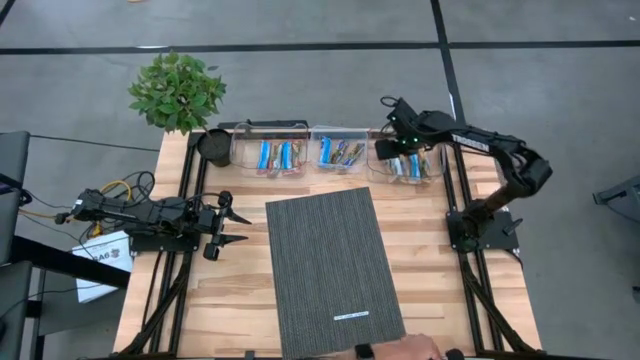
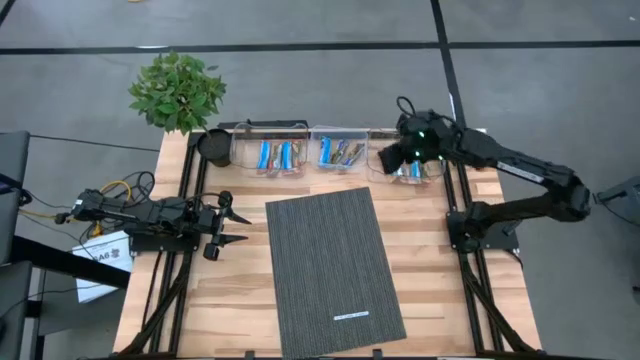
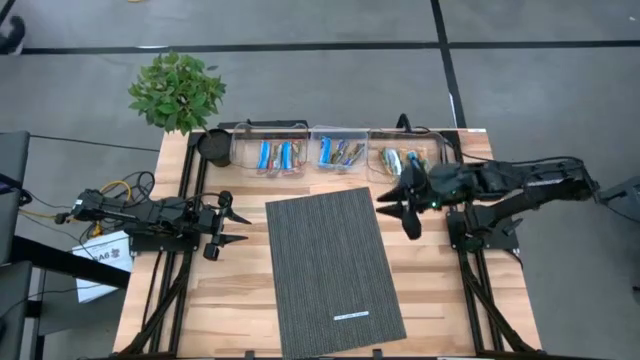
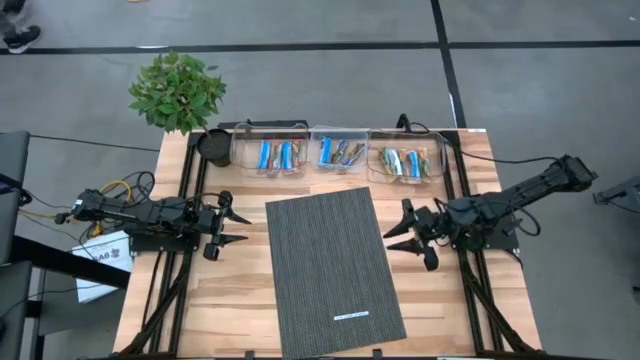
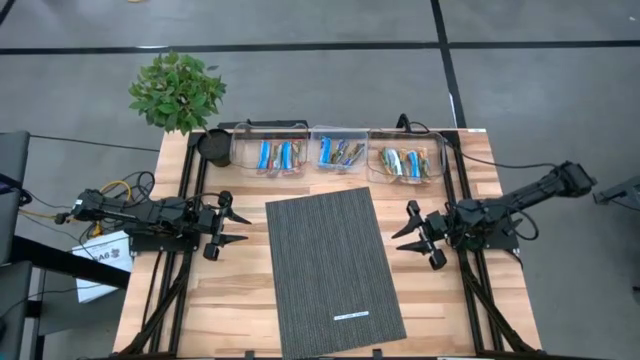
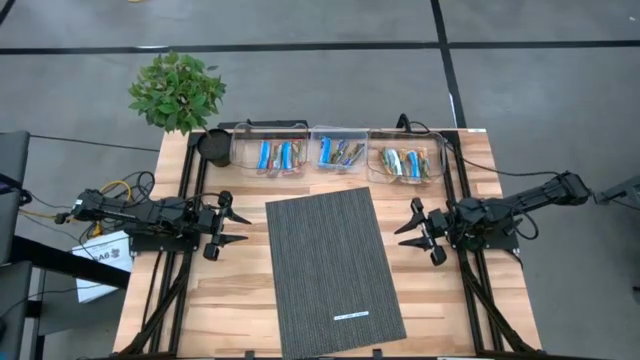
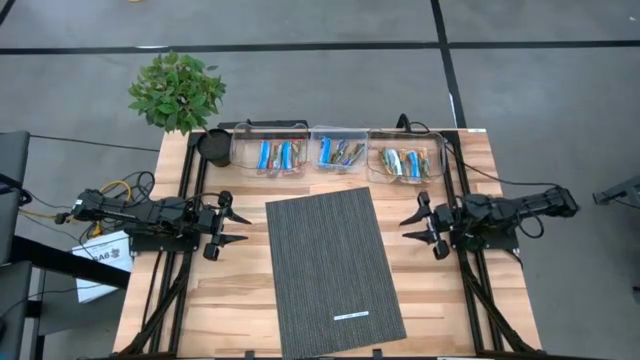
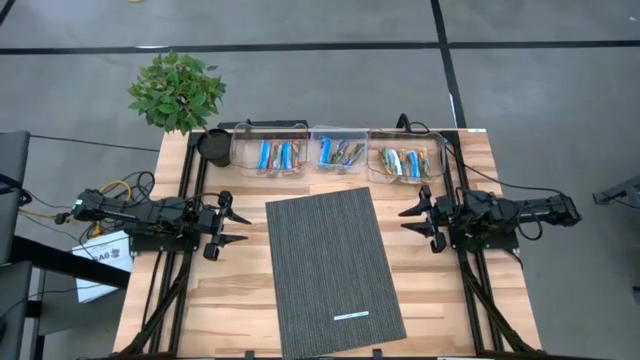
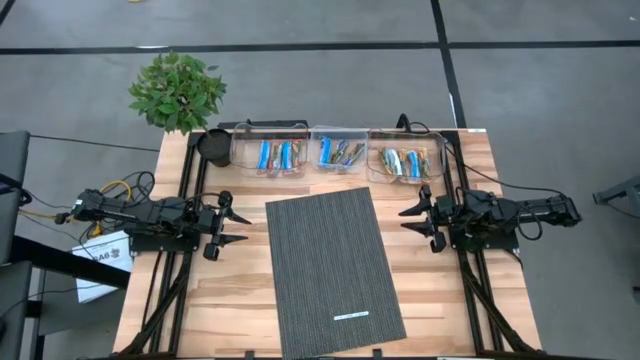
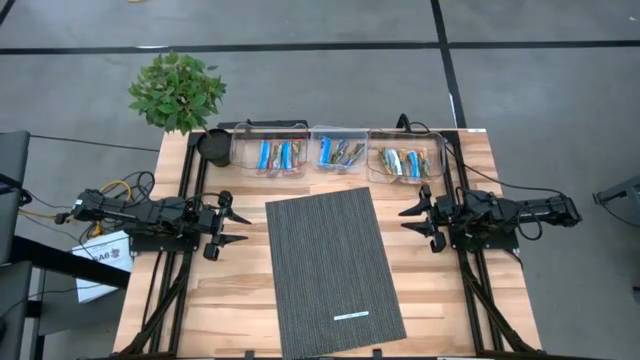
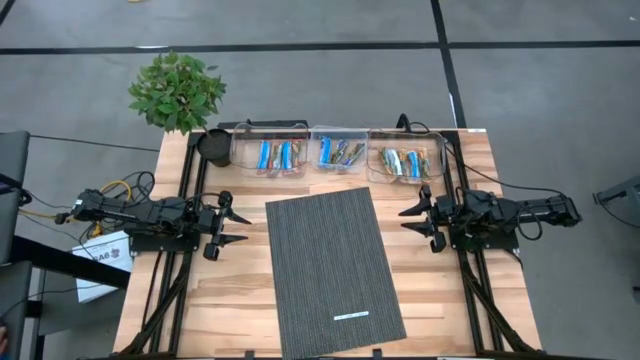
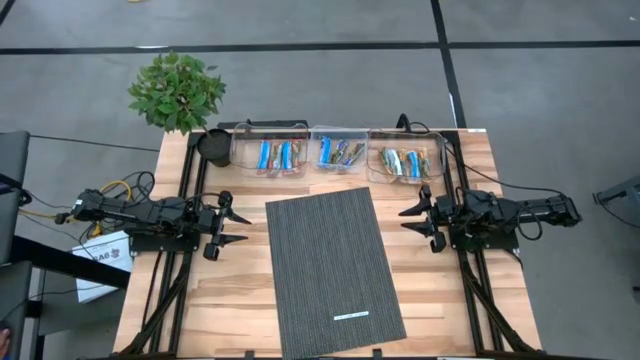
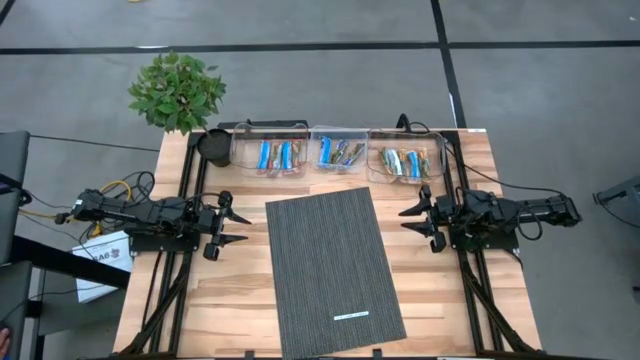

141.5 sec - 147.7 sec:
Task: Pick and place Granola Bars by type
Return to Home Position

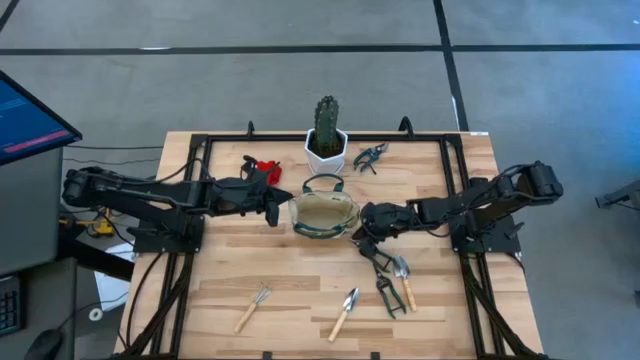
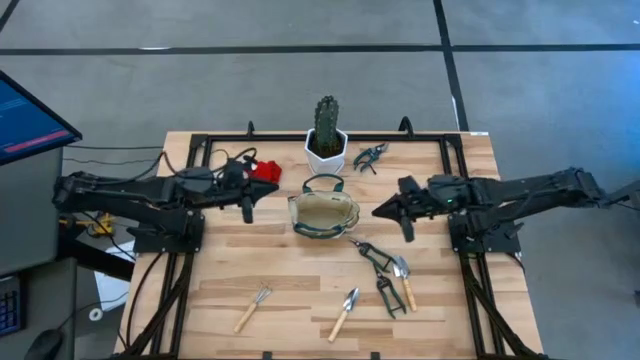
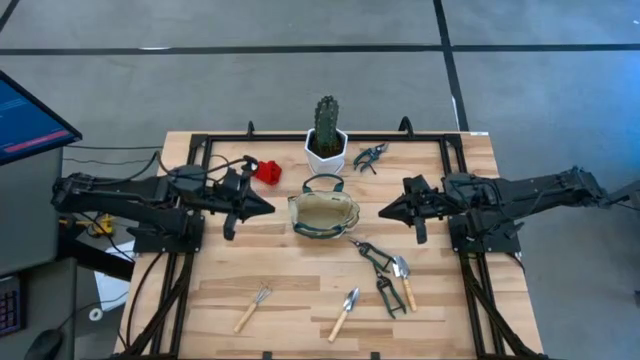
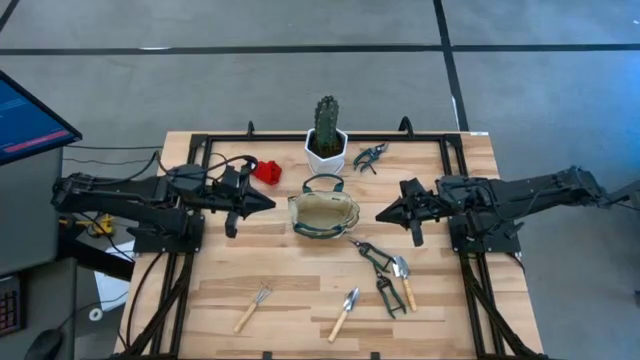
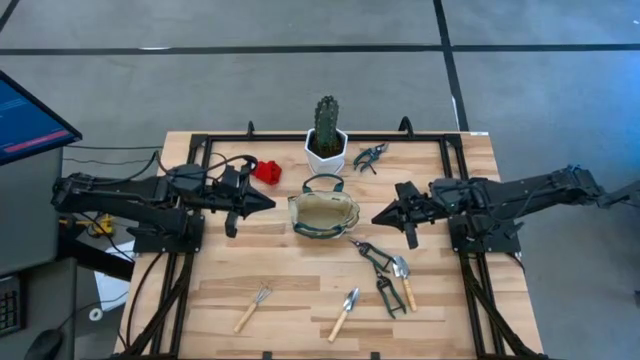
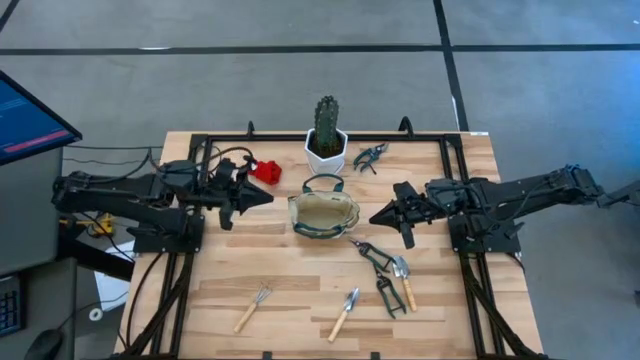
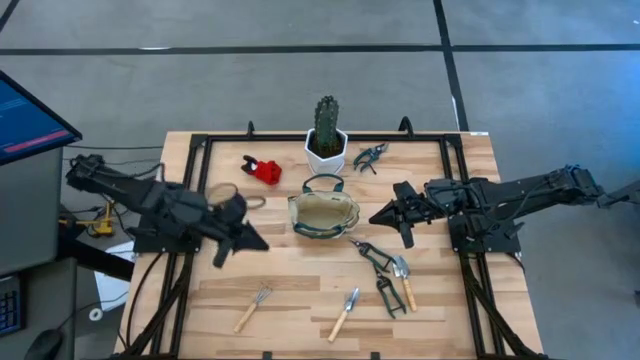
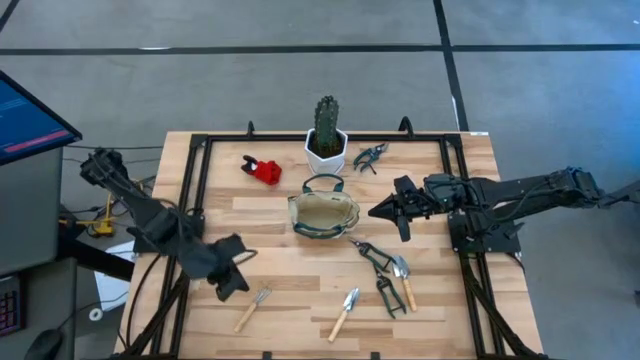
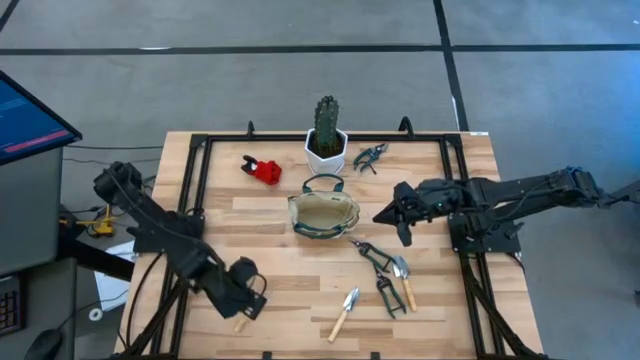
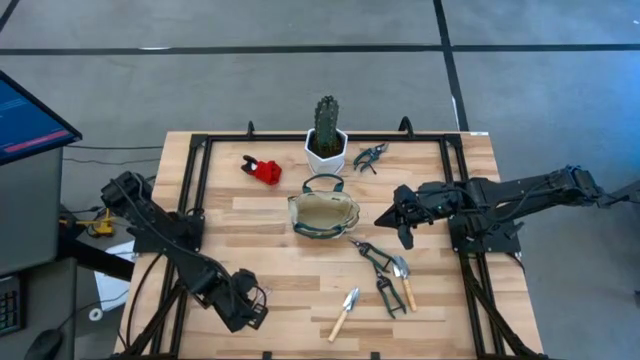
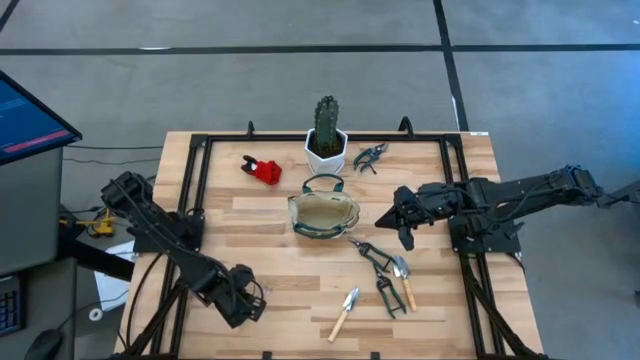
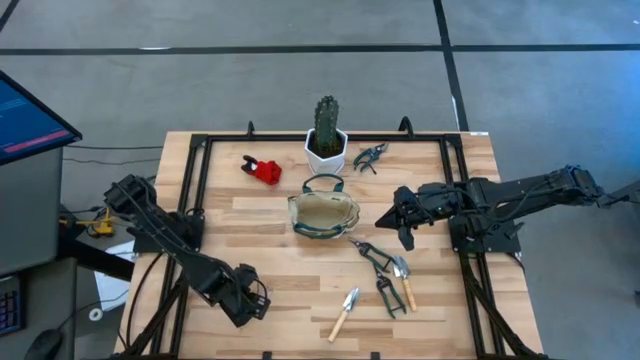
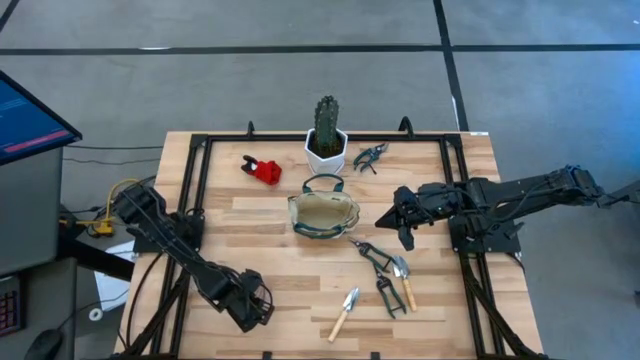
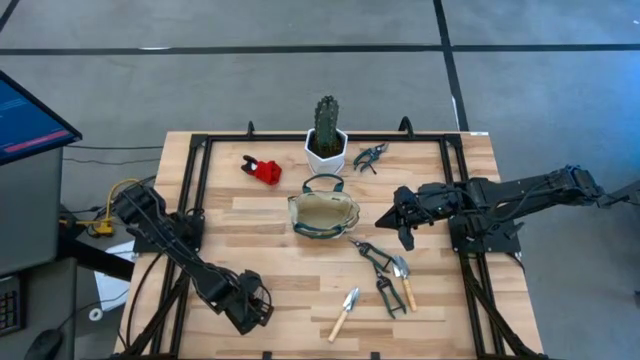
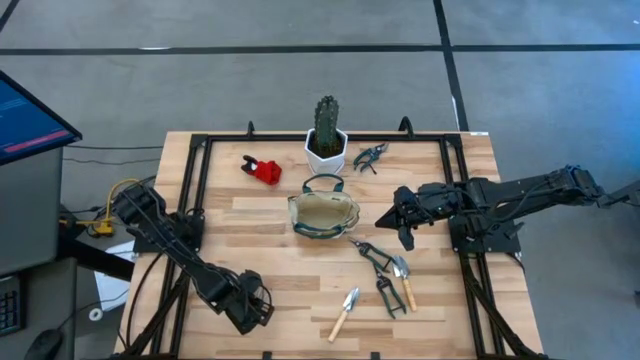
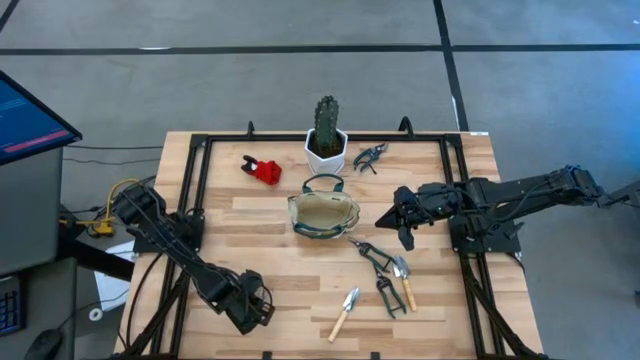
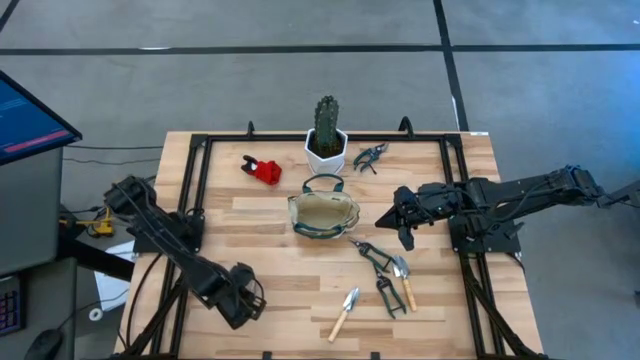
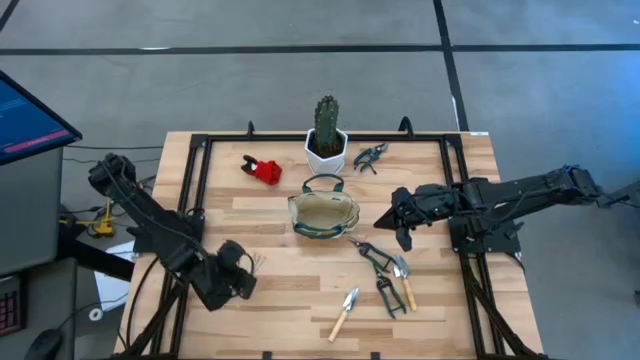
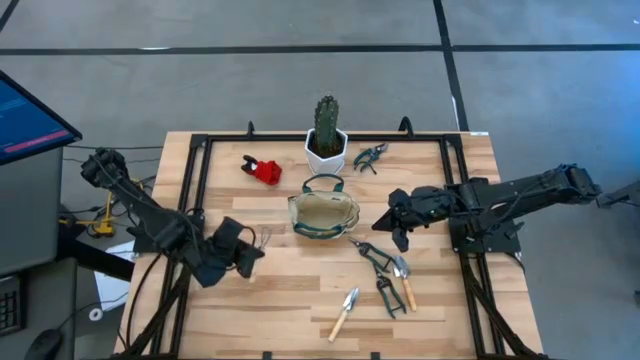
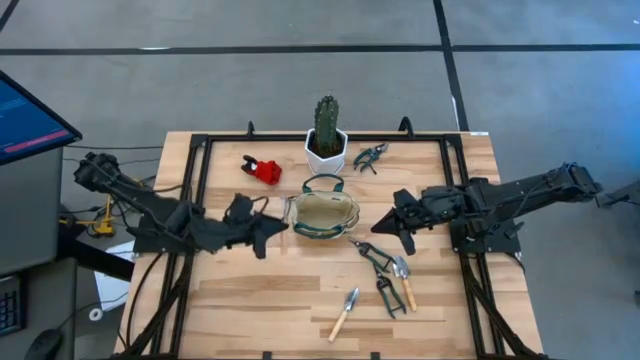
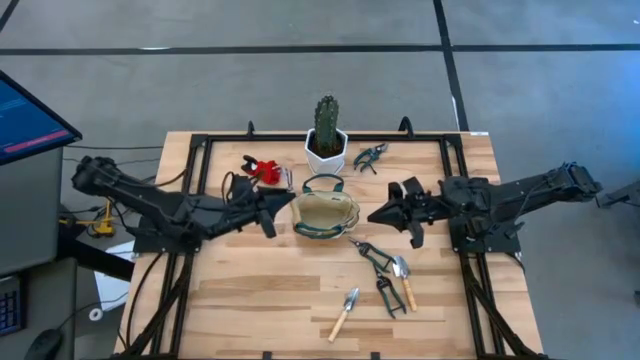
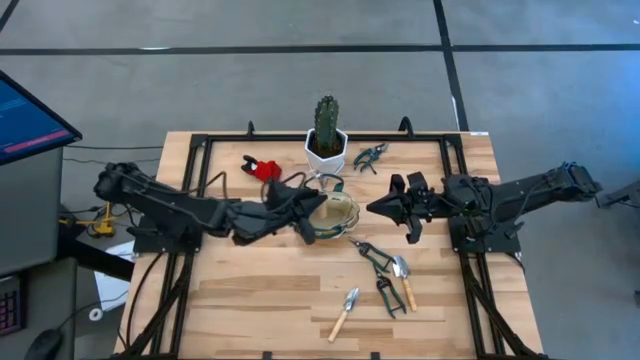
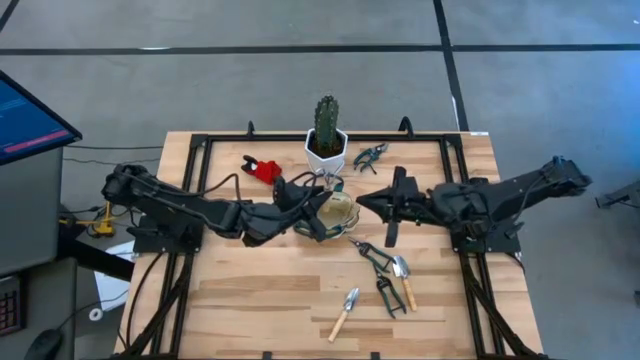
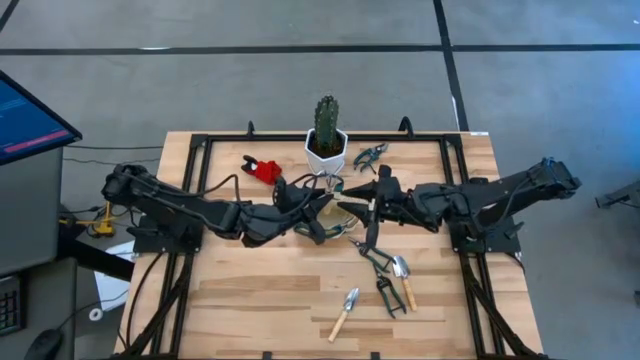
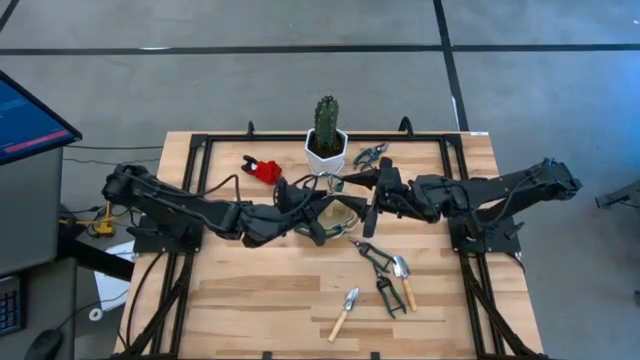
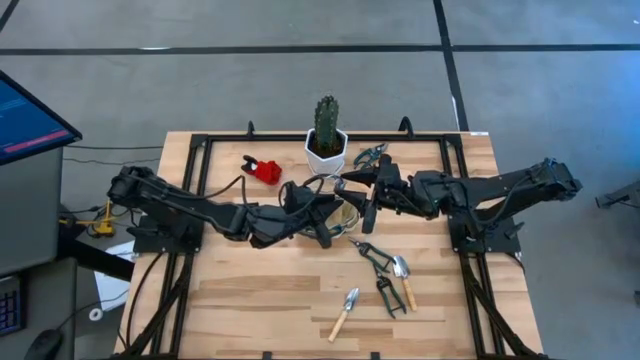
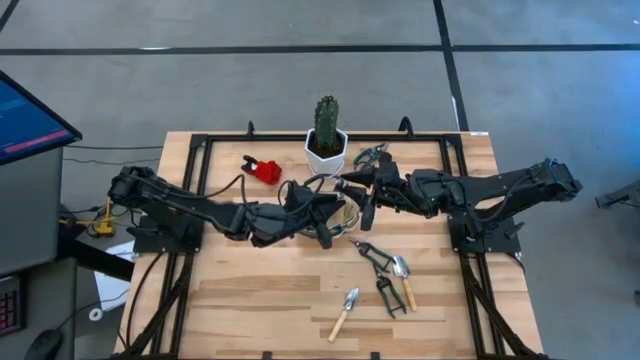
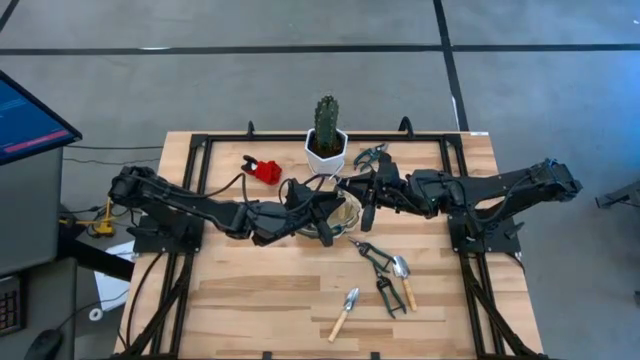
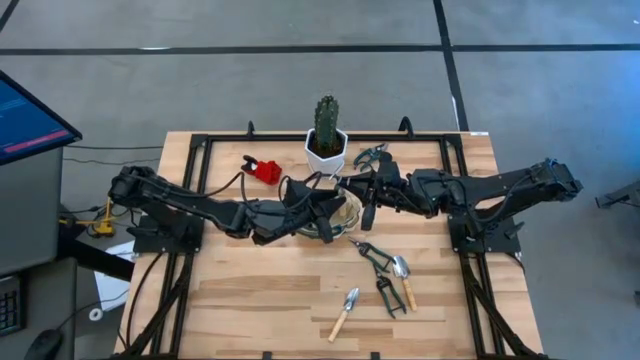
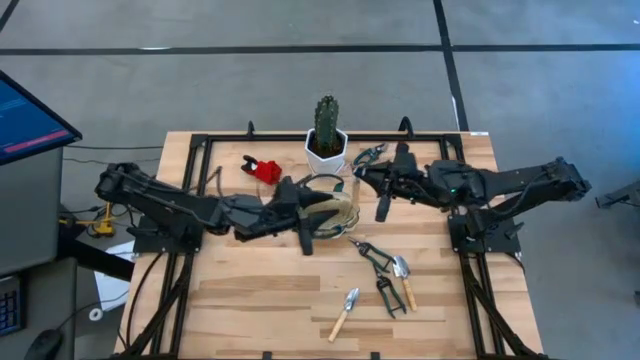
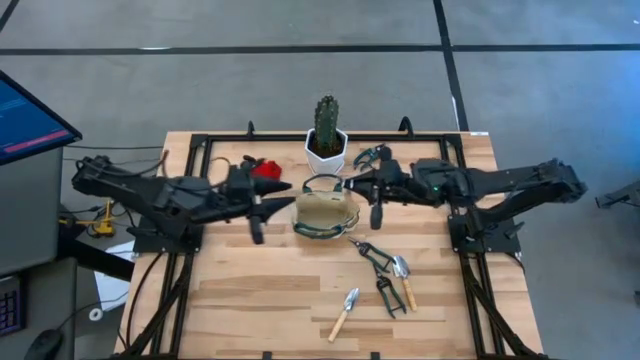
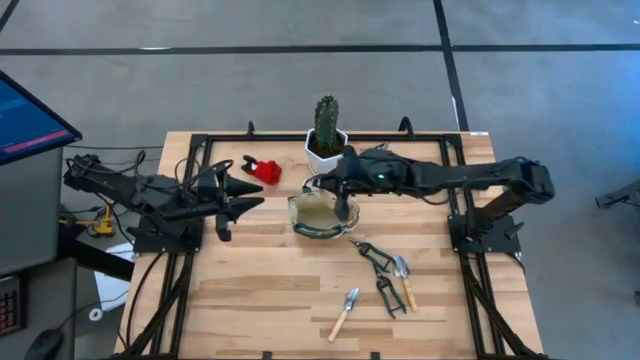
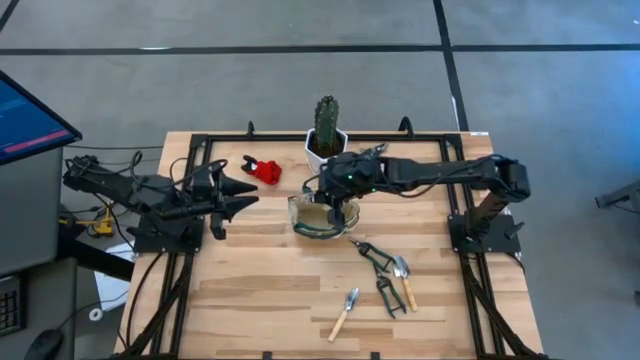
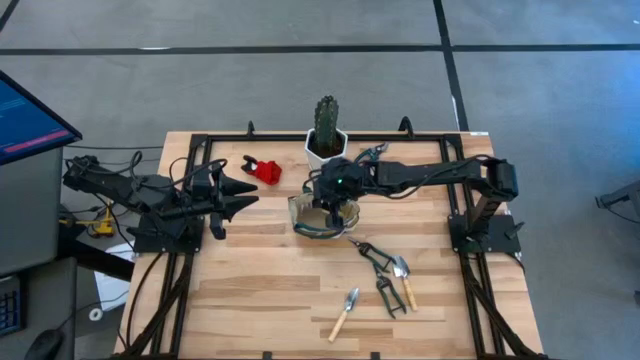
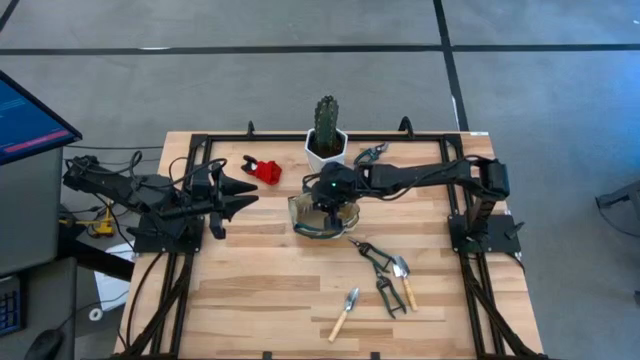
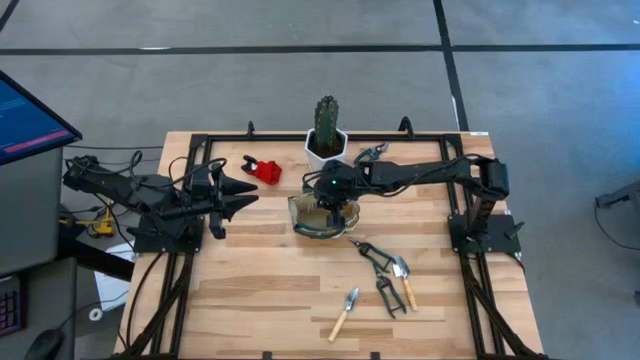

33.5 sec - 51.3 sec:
Task: Pick & Place Garden tools in Gardening bag
Put the brown hand rake into the gardening bag
